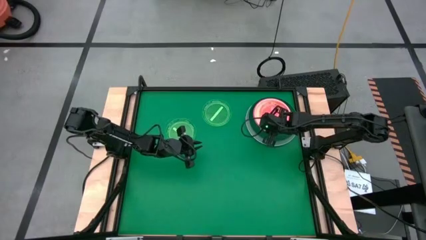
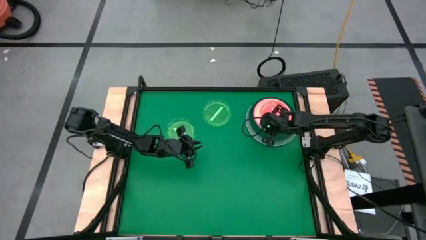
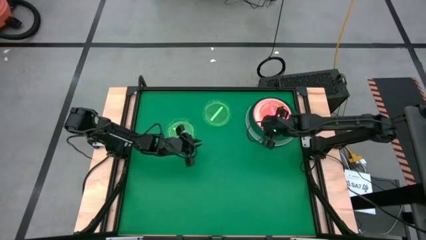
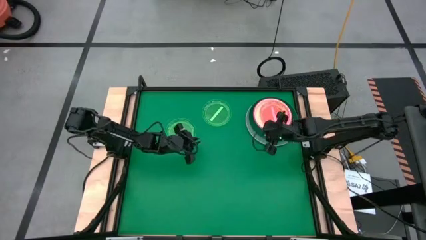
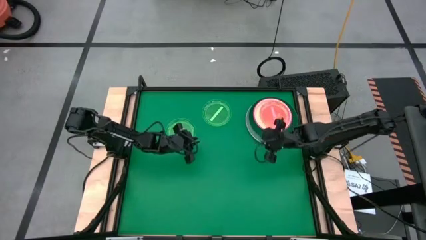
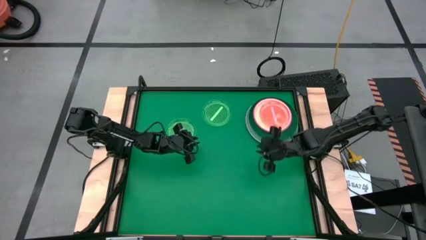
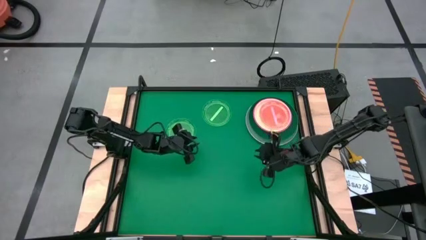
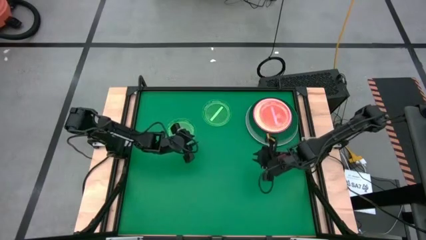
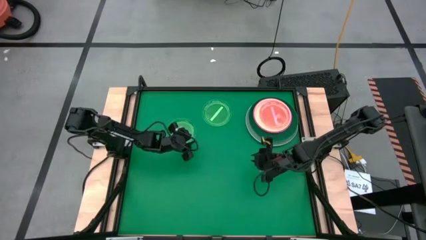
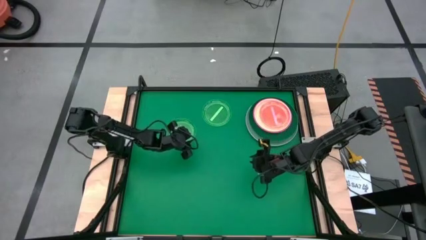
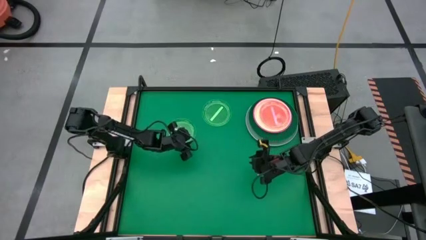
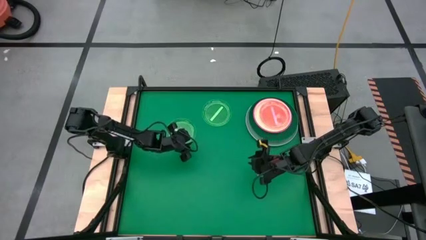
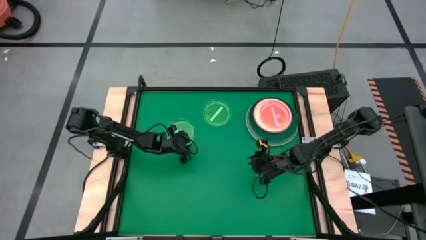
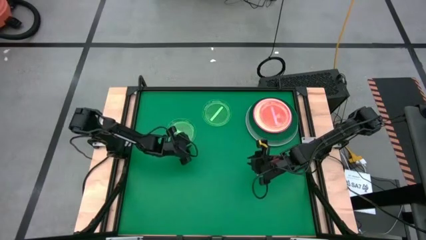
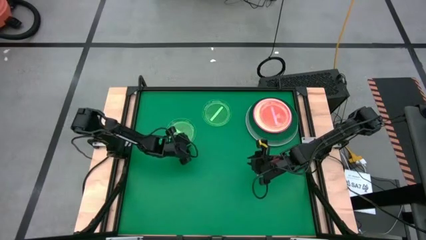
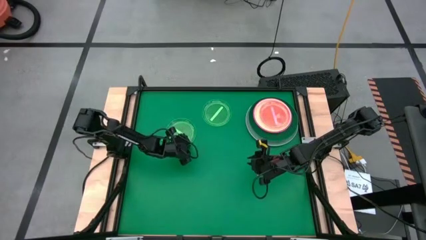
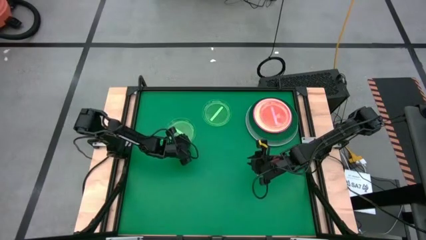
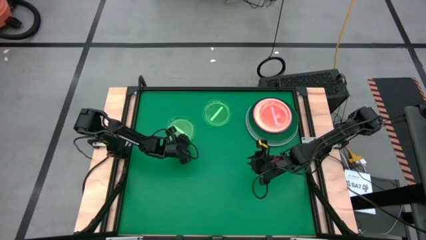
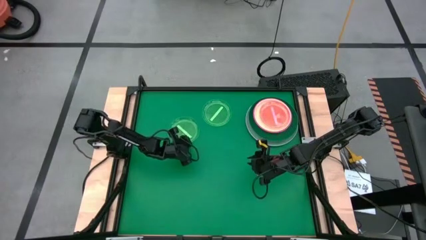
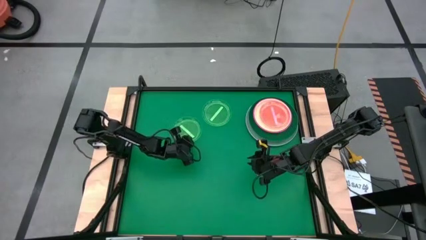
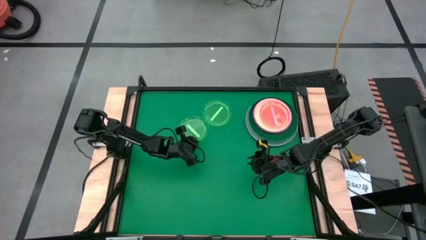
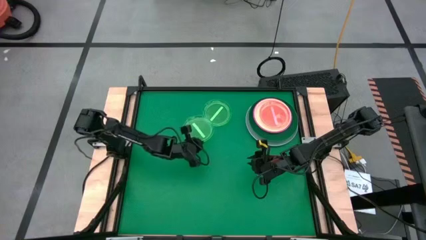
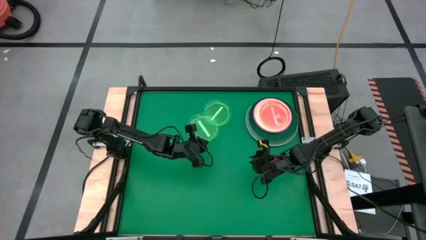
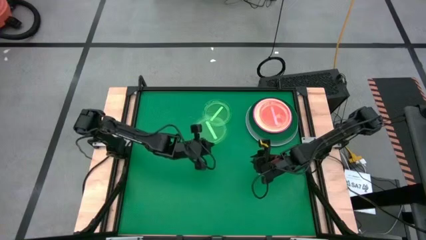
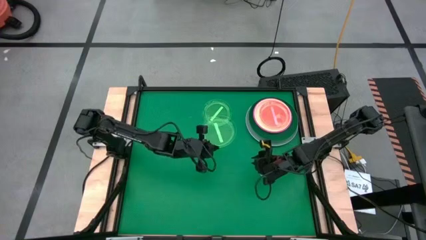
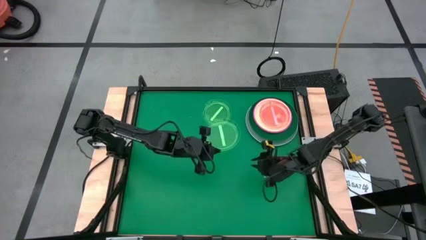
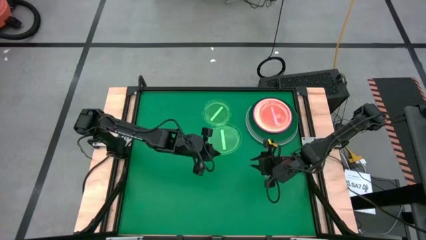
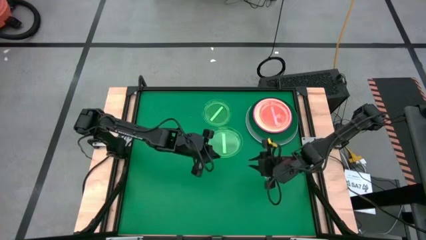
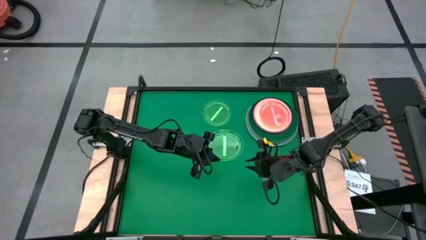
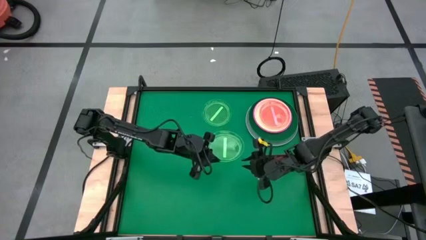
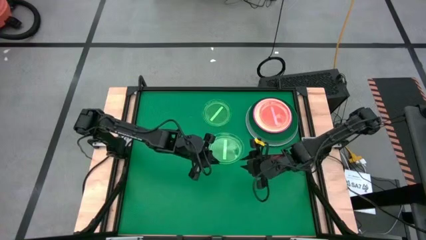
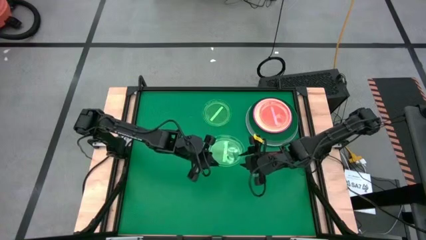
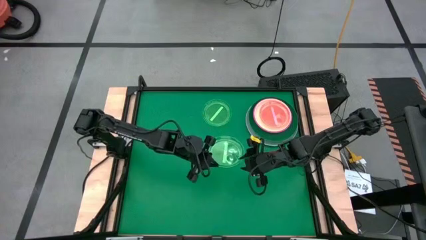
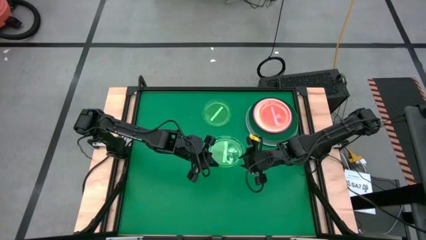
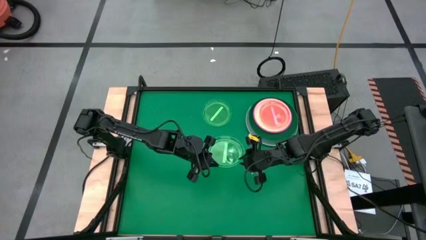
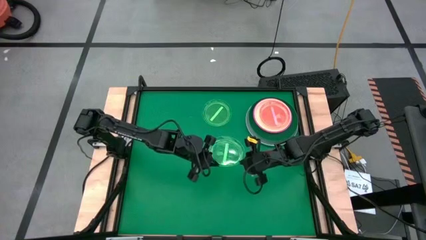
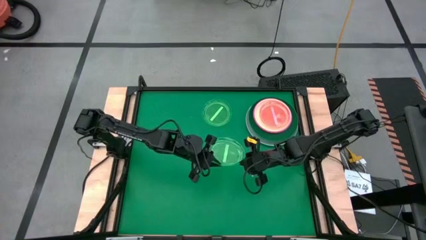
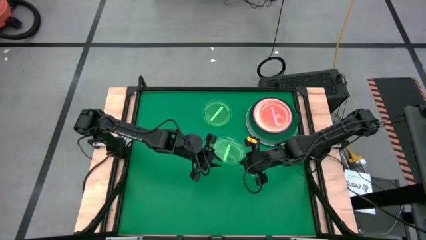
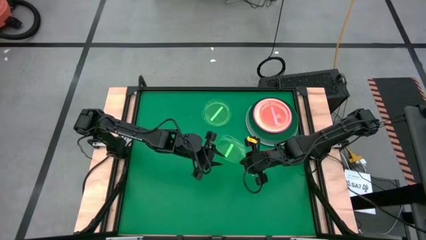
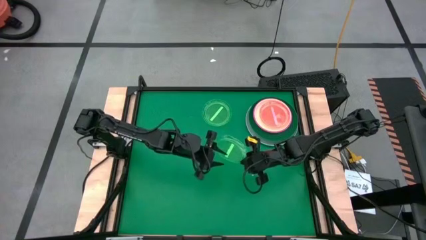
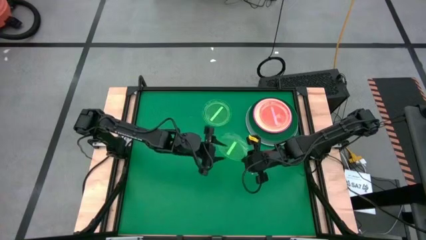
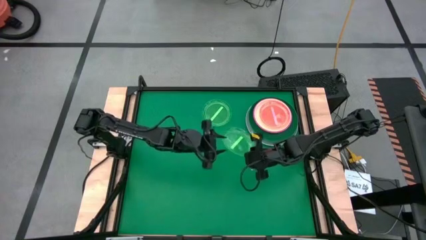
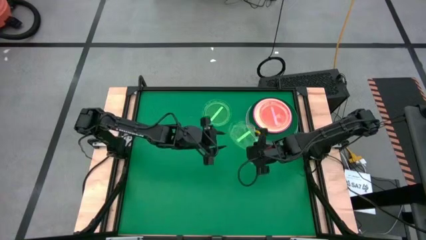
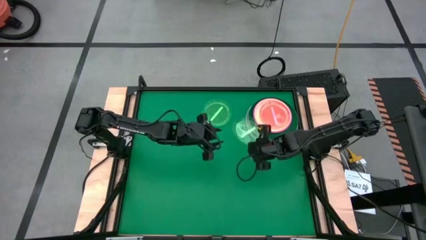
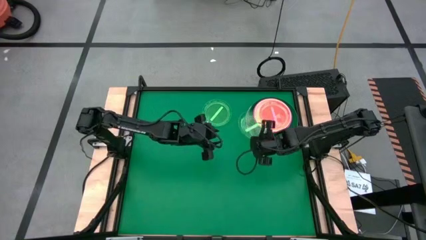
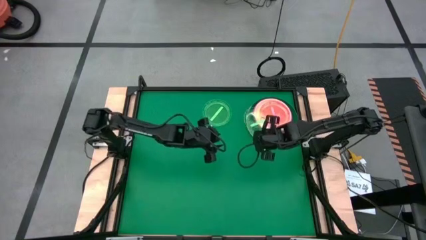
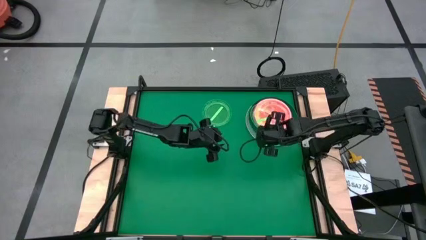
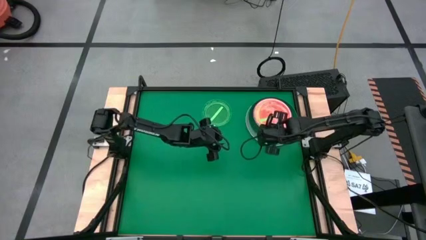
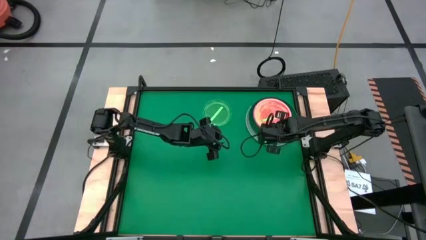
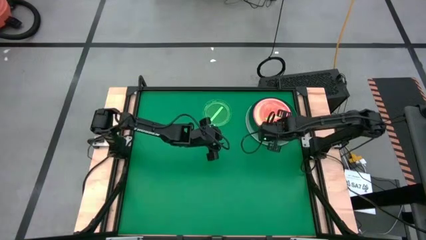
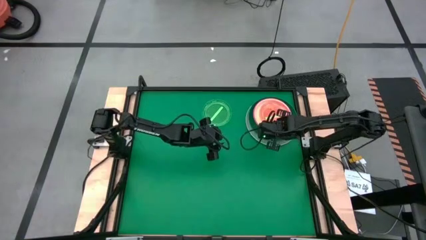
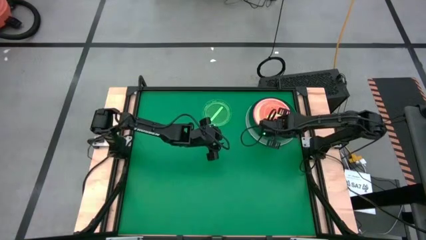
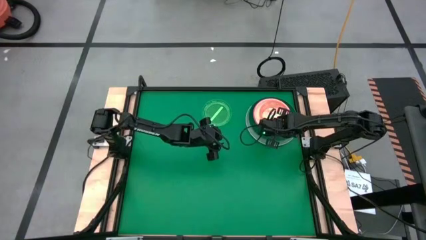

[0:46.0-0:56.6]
Task: Stack plastic plates
Stack the left light green plate on top of the orange plate
